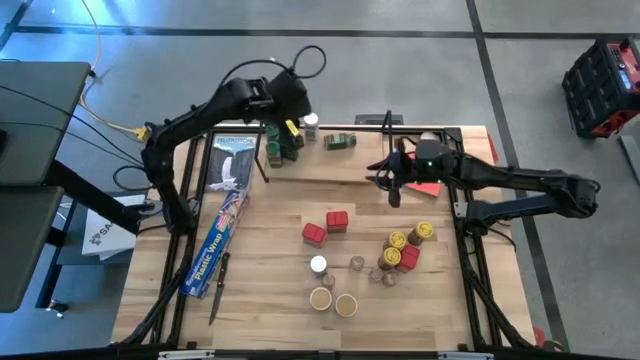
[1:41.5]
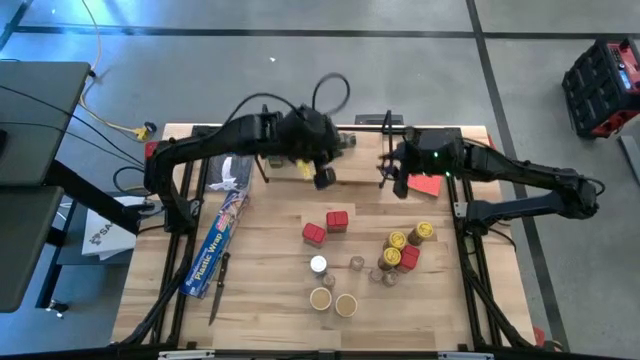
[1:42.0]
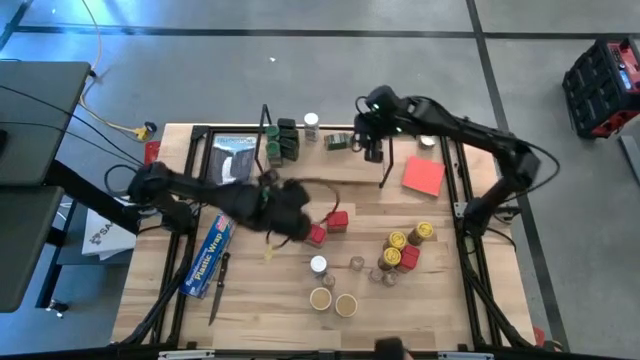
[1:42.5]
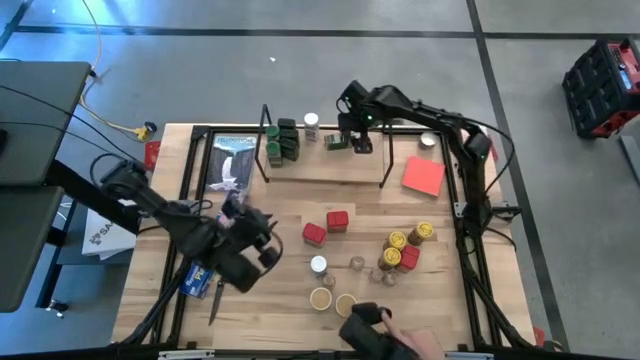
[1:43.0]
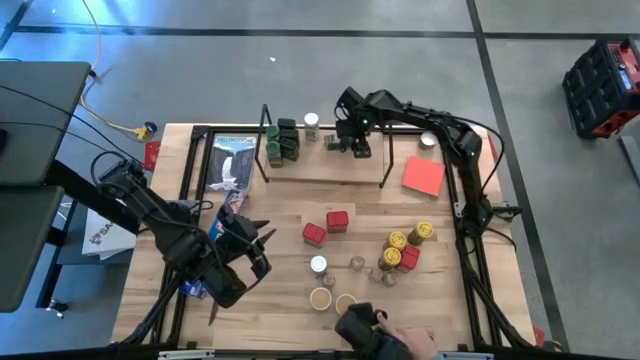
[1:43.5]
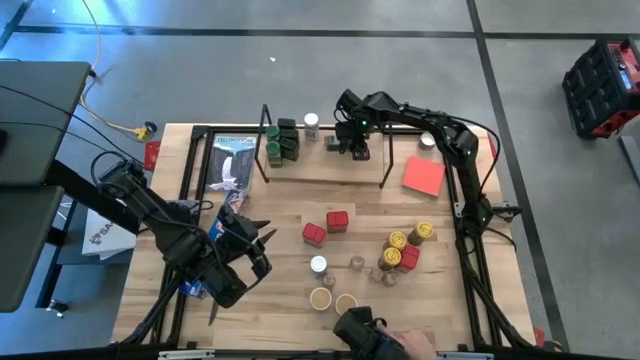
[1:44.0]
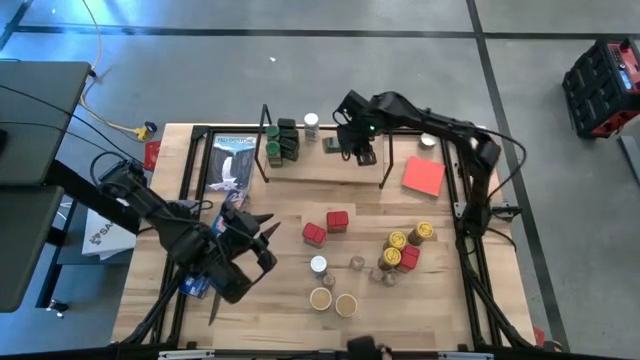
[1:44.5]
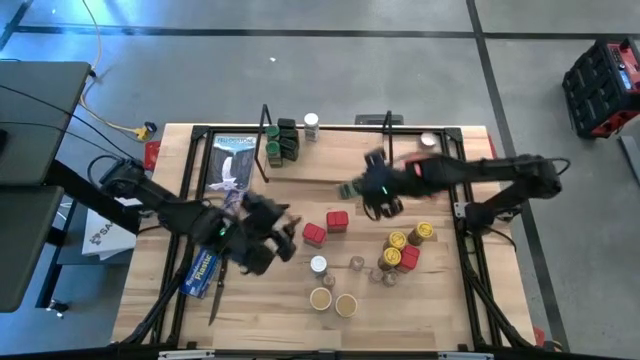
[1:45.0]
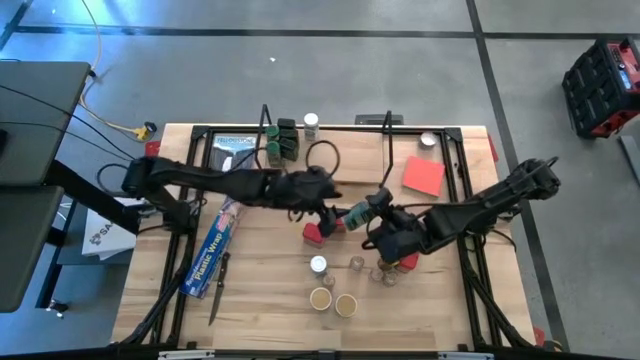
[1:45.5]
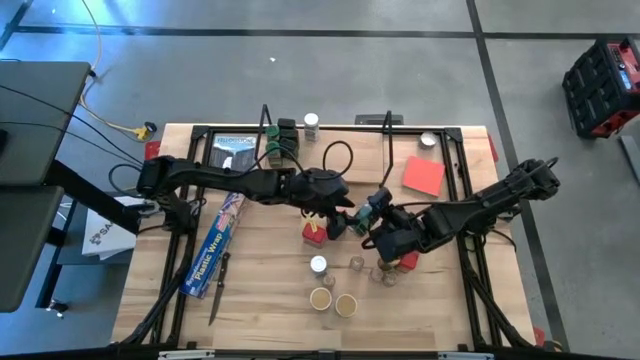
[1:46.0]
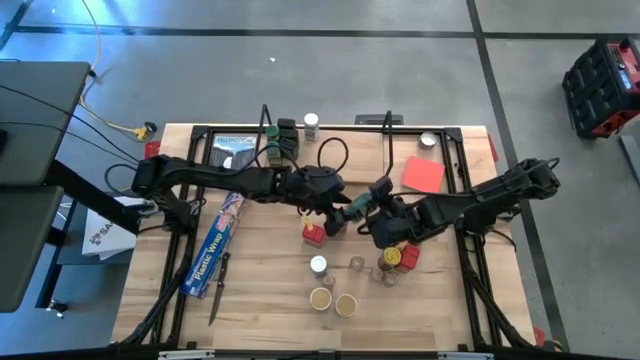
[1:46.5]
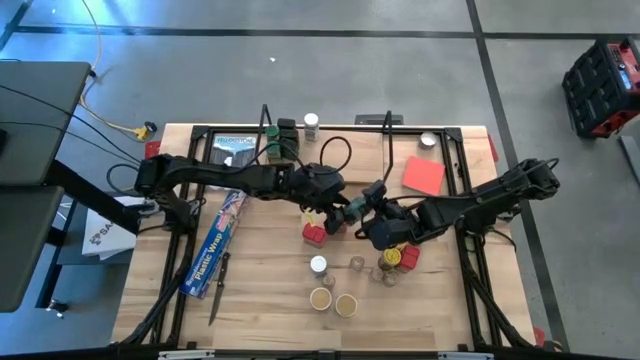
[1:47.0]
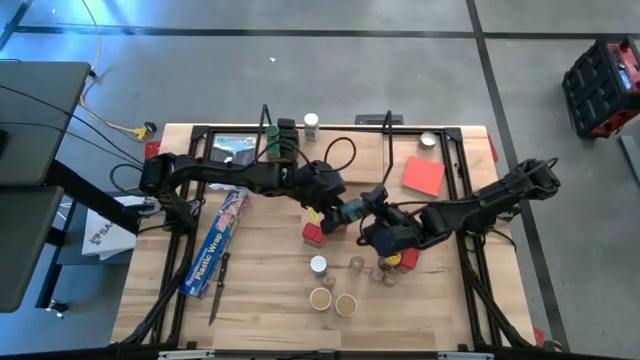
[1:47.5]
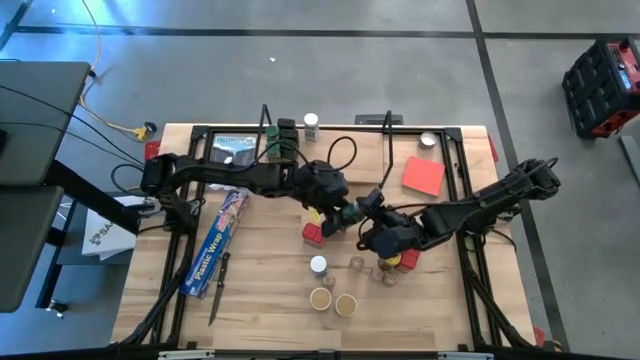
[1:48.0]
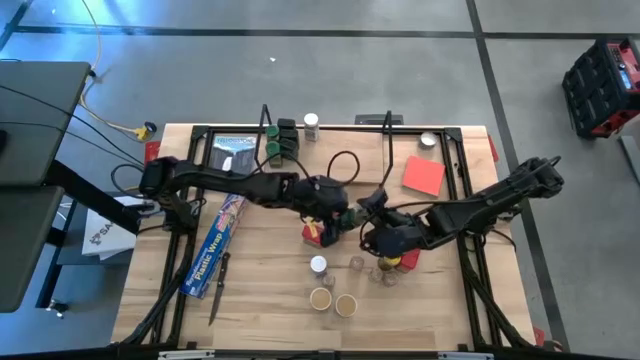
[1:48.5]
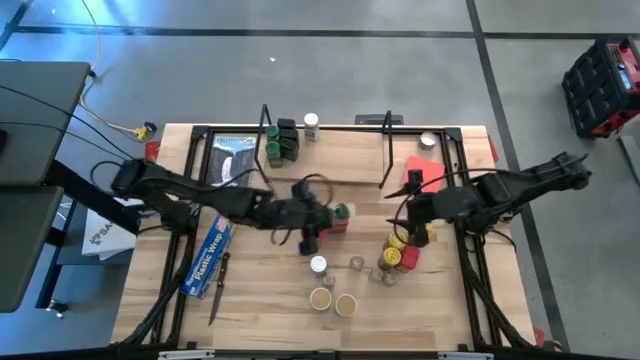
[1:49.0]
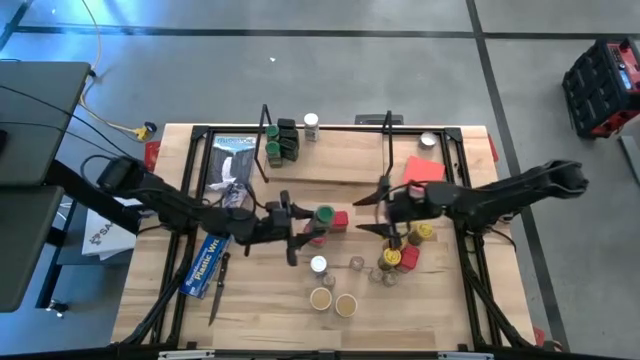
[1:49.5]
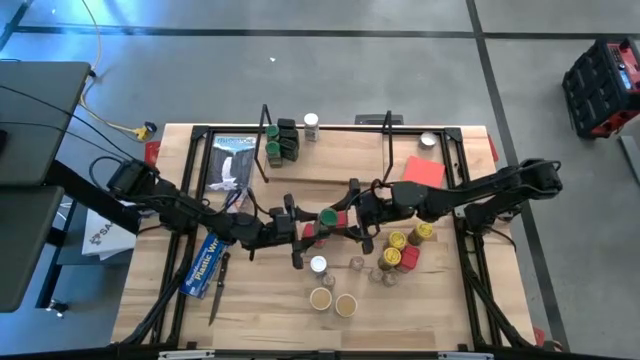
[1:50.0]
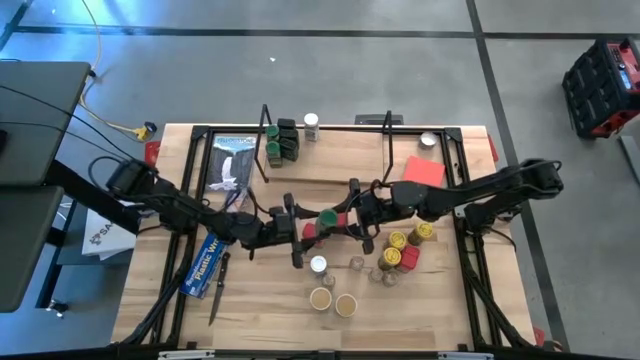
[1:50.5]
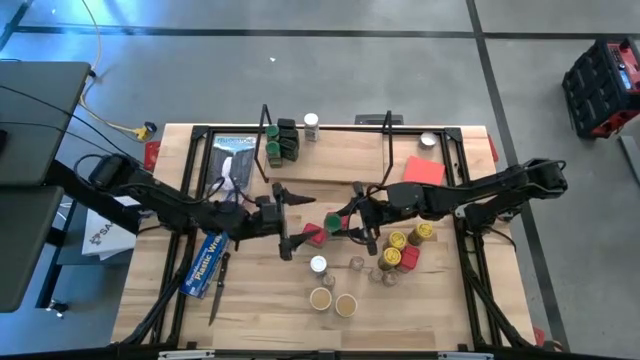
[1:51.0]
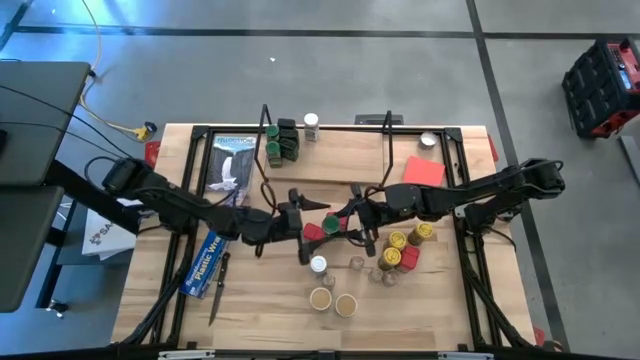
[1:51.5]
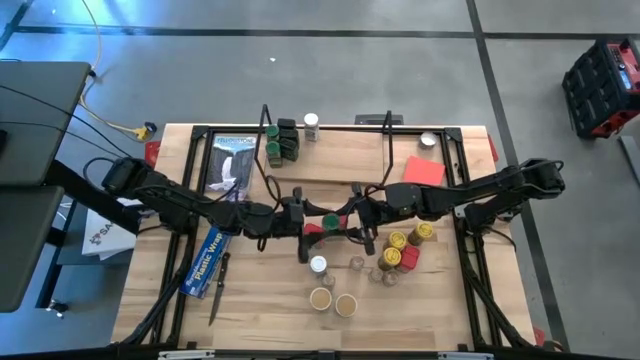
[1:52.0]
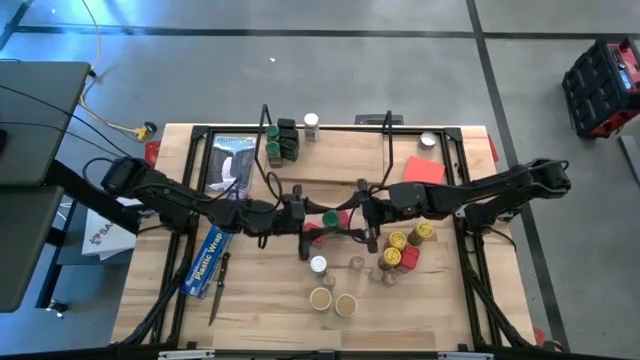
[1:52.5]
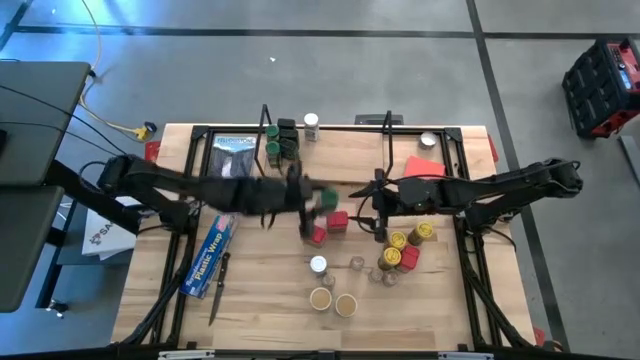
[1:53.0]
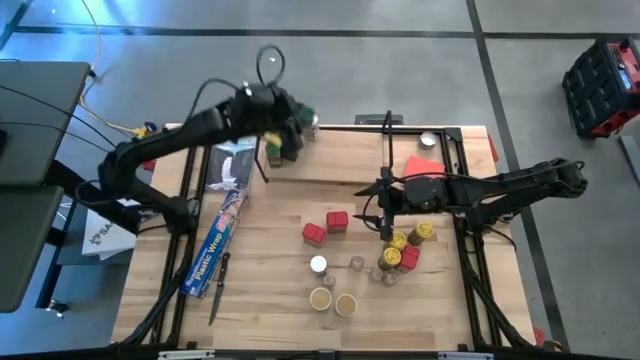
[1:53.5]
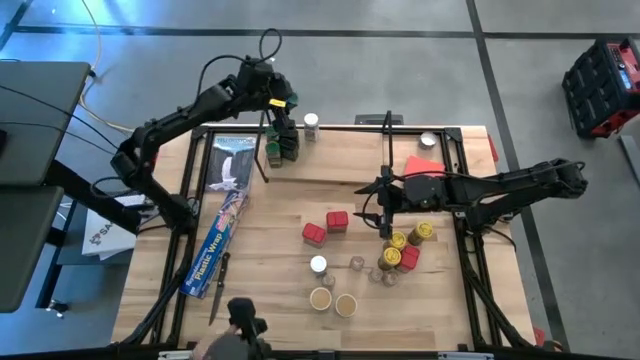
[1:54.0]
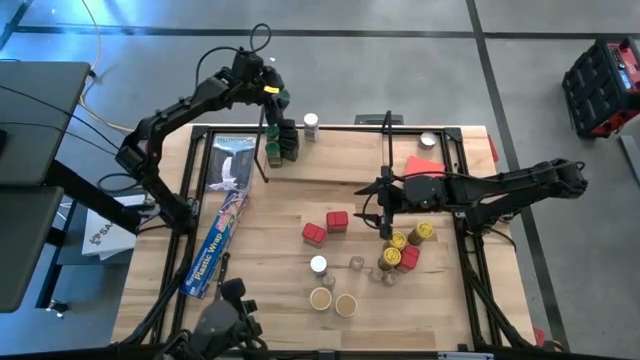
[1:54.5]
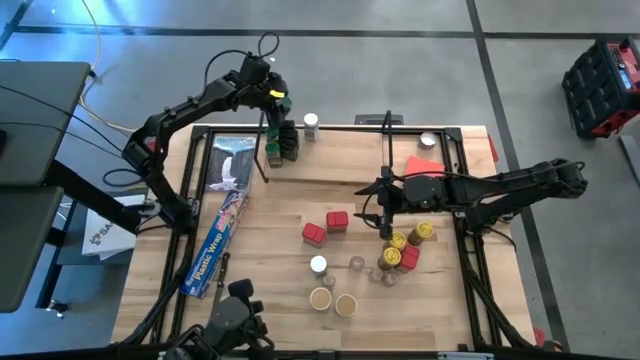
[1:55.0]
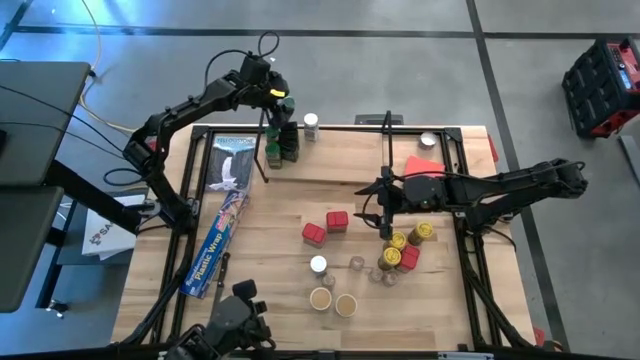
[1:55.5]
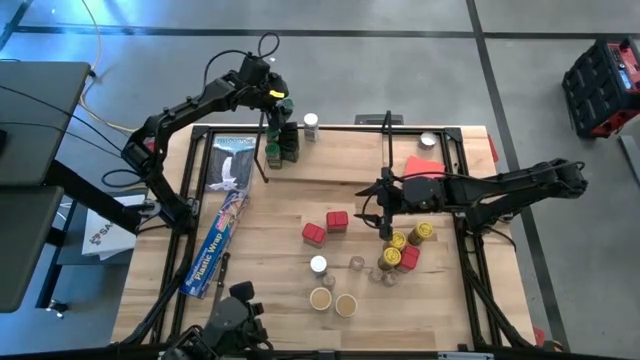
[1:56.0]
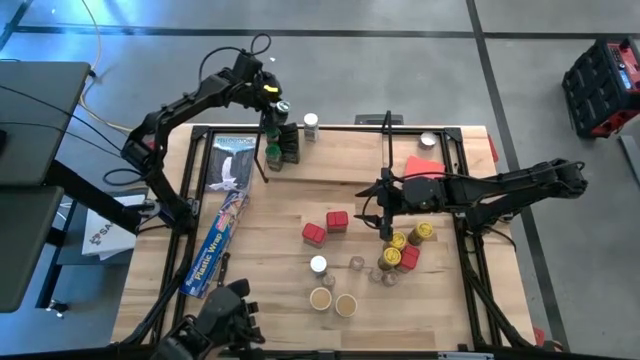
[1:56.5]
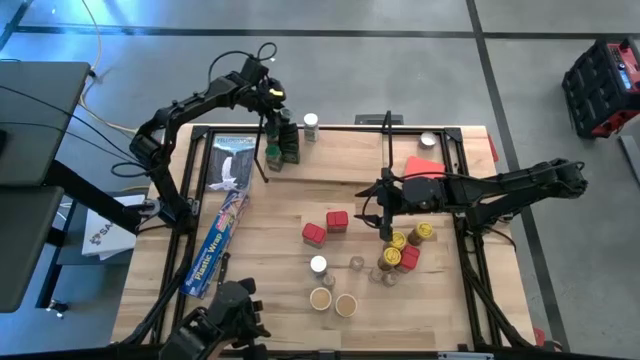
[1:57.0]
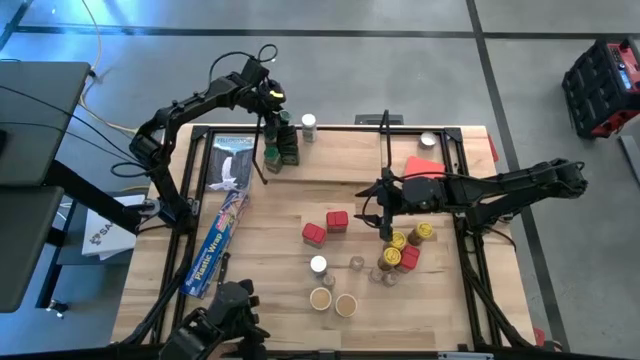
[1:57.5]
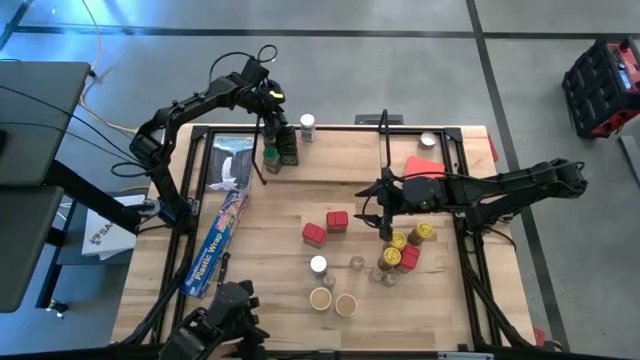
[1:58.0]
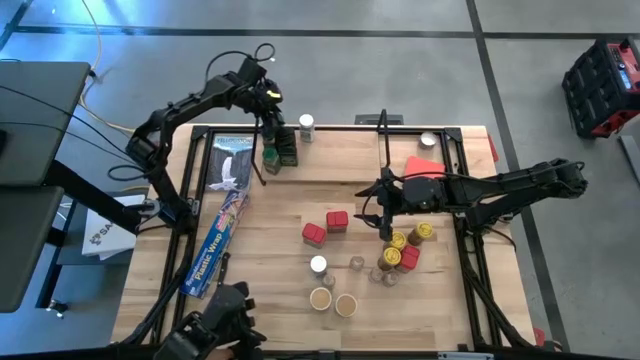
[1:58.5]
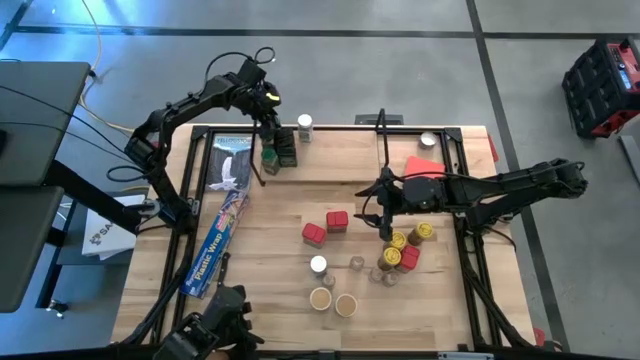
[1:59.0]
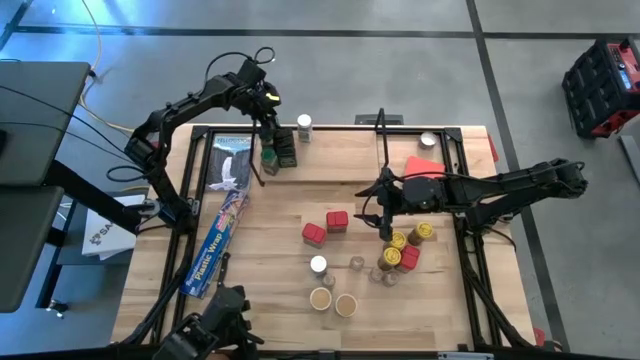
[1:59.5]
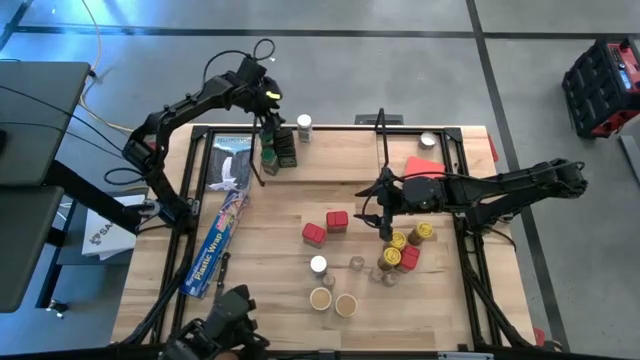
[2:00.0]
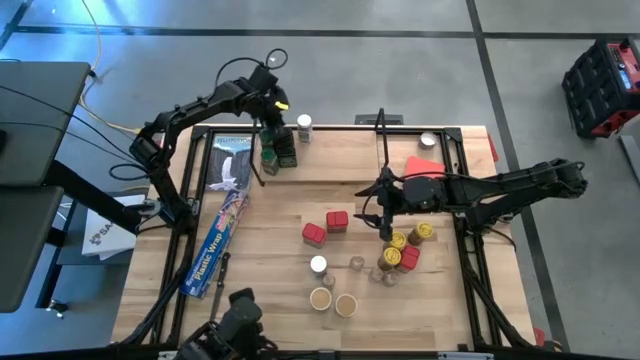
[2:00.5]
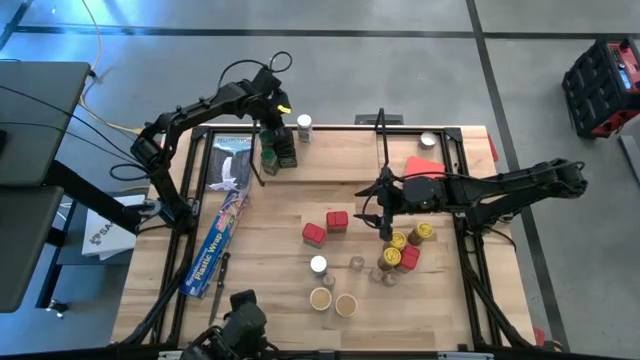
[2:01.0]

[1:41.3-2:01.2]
Task: Shelf spices
Put the green seasoning bottle on the shelf and align it with the other green seasoning bottles

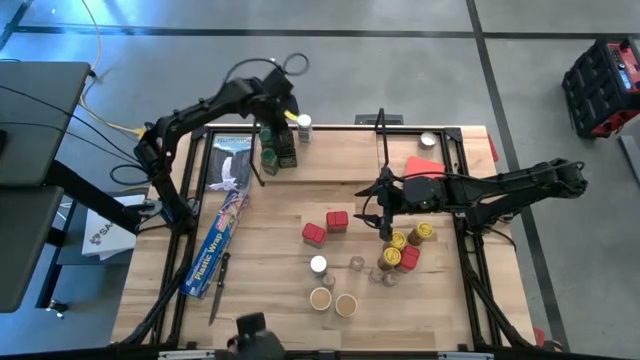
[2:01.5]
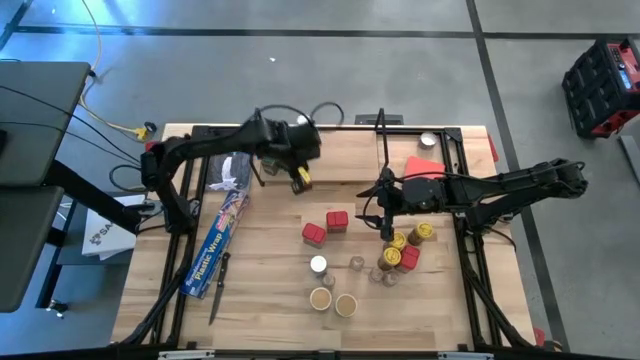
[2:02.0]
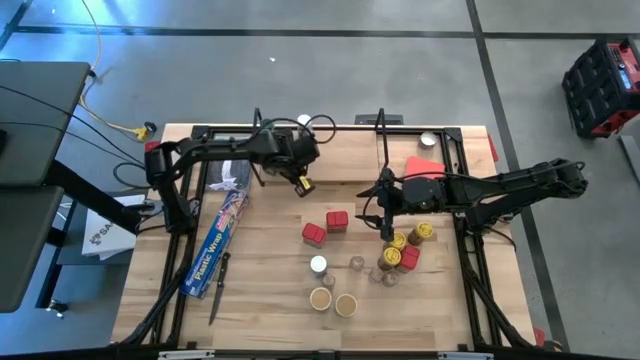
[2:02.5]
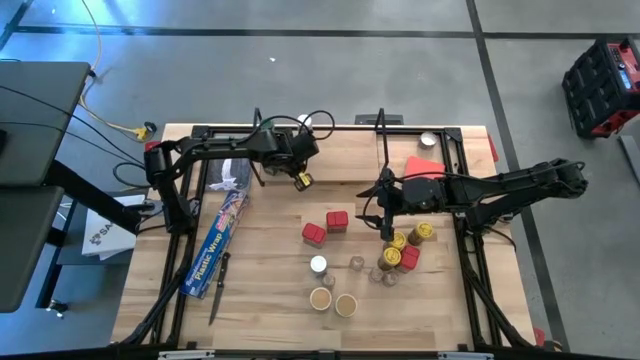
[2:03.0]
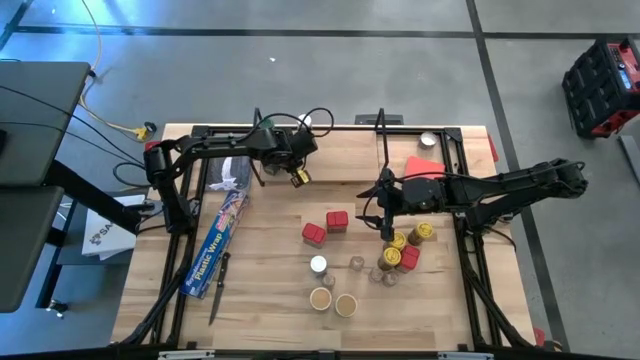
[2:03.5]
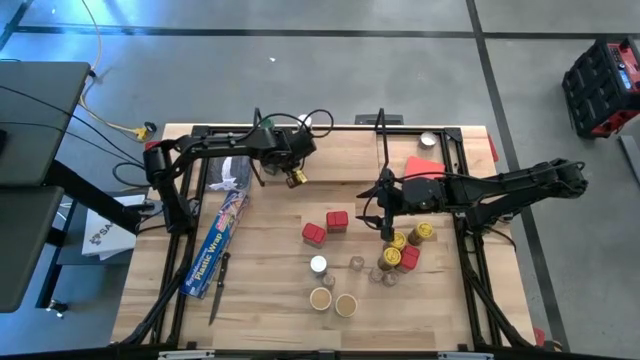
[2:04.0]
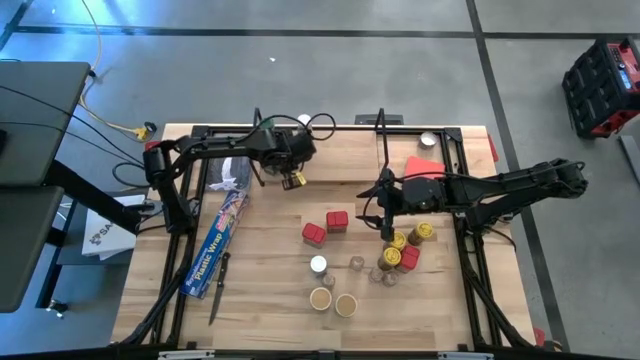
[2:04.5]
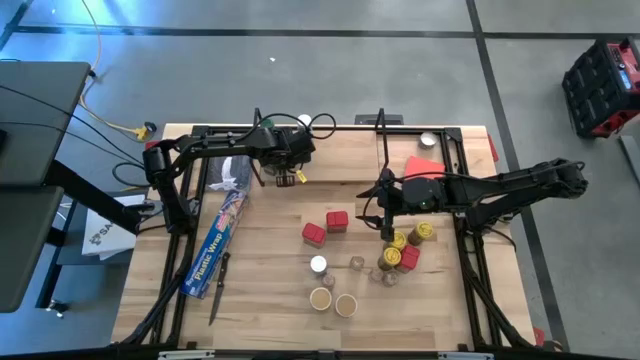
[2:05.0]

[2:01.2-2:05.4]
Adjust the black seasoning cans on the shelf
